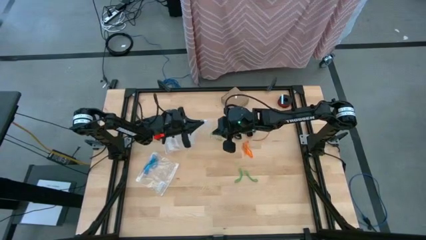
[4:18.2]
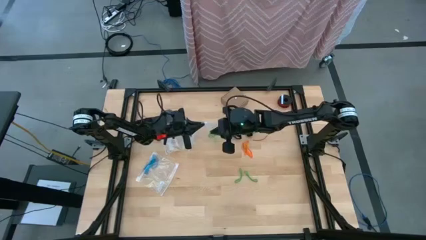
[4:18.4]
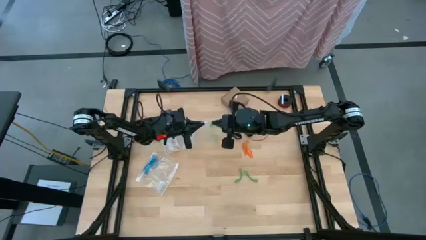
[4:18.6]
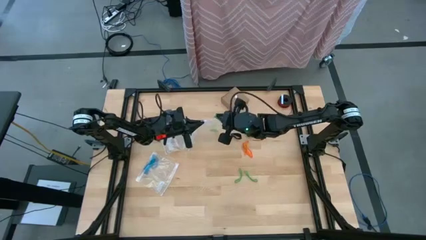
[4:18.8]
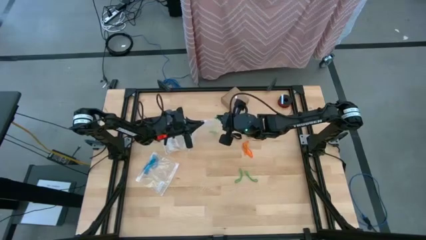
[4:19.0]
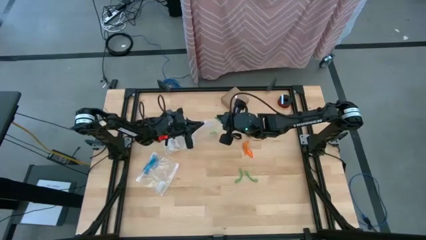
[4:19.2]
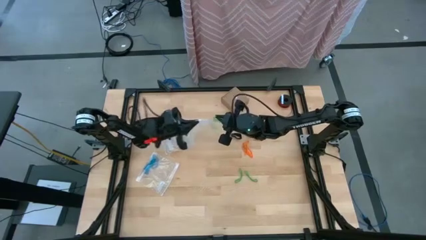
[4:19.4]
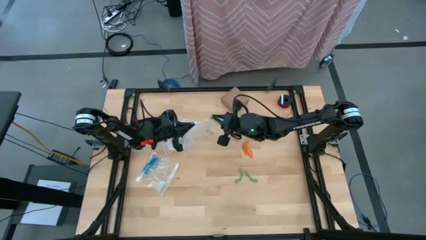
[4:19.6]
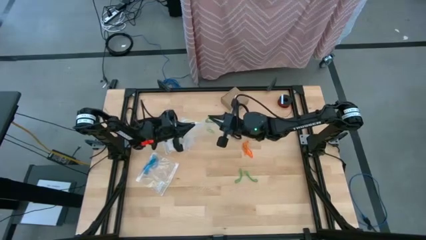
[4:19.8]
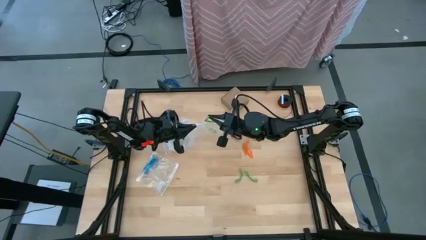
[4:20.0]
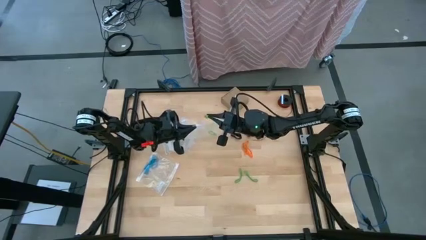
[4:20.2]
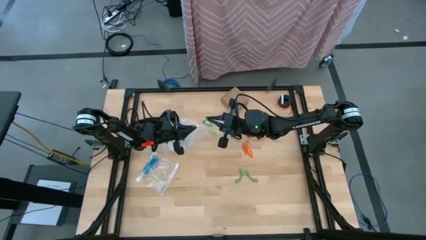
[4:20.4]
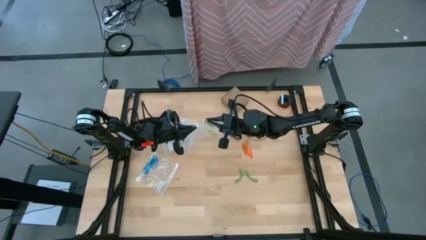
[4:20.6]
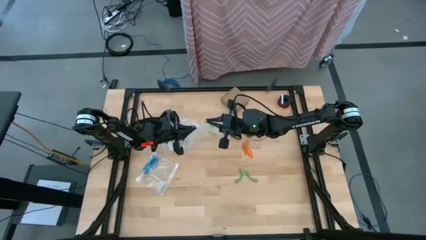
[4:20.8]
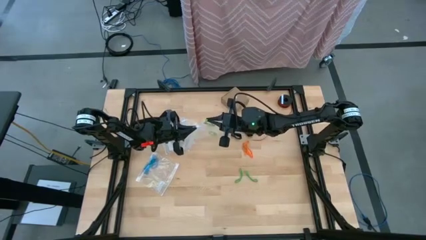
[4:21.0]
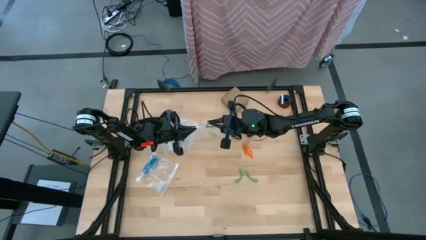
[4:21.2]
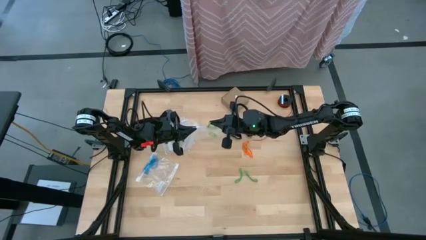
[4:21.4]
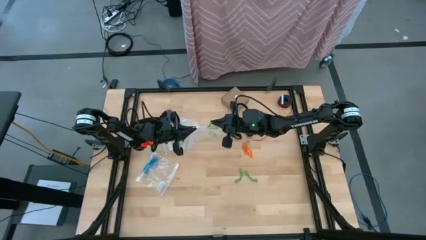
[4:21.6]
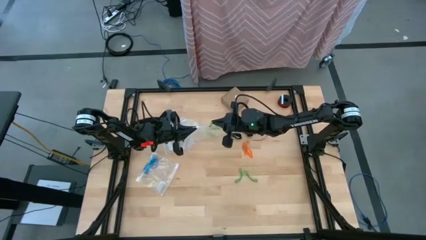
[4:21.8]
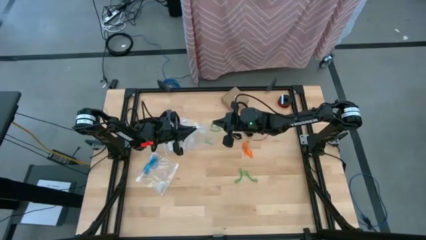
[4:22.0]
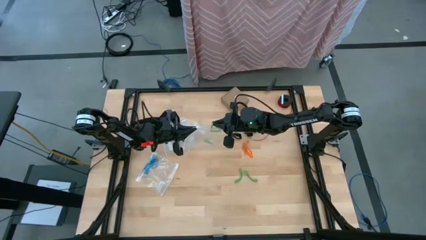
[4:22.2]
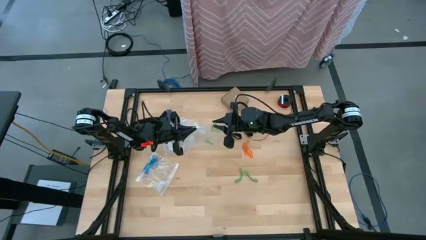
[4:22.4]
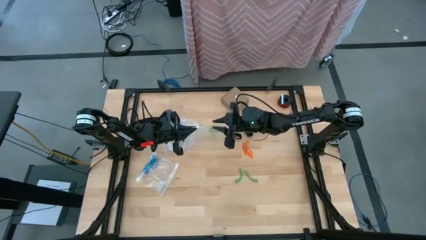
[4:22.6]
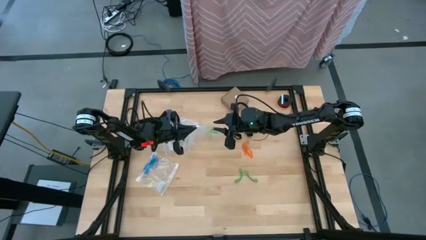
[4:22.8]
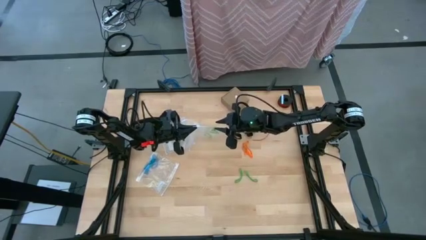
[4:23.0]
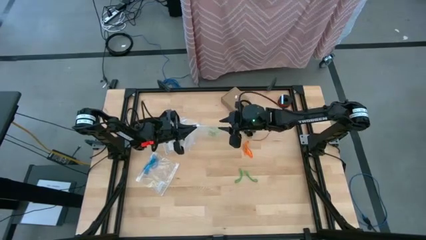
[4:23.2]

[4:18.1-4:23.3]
Task: Sort rubber bands
Put the green rubber band into the transparent zip bag

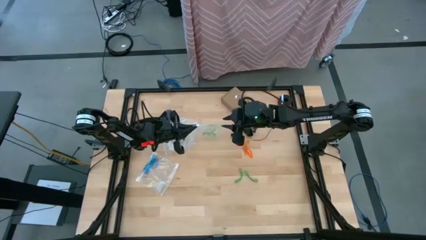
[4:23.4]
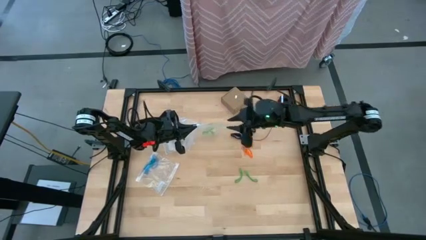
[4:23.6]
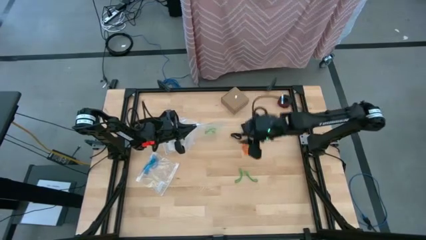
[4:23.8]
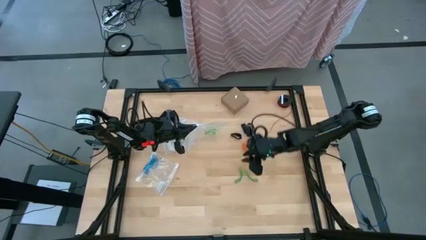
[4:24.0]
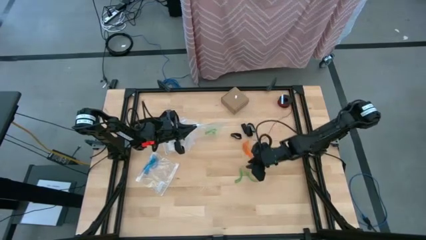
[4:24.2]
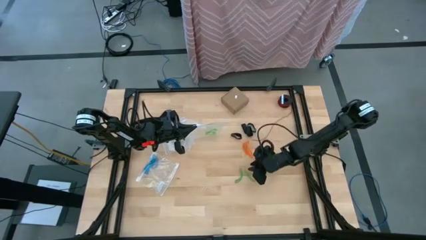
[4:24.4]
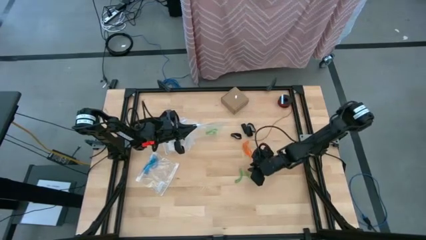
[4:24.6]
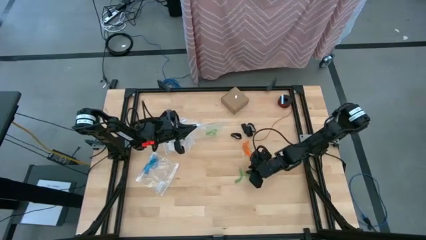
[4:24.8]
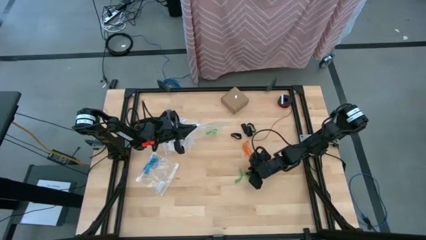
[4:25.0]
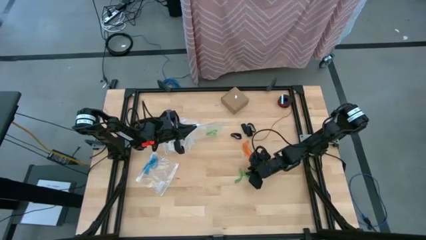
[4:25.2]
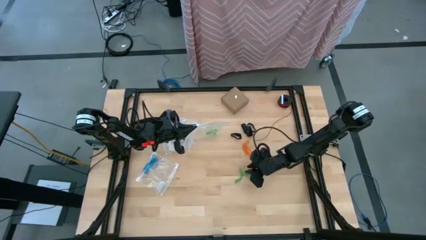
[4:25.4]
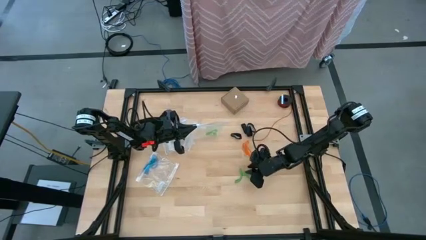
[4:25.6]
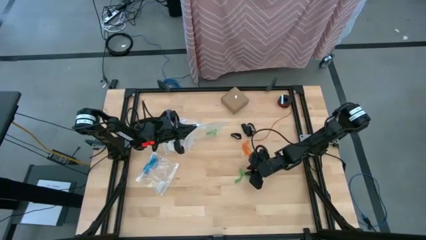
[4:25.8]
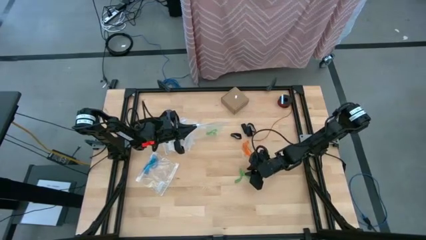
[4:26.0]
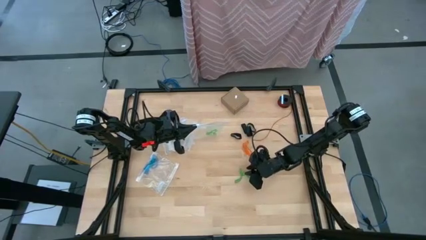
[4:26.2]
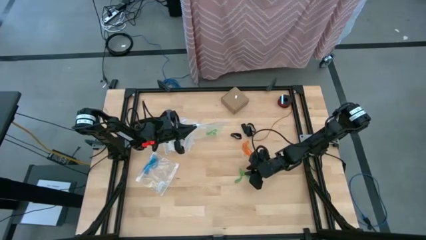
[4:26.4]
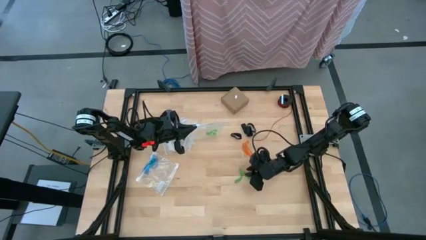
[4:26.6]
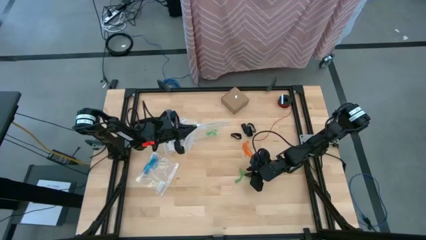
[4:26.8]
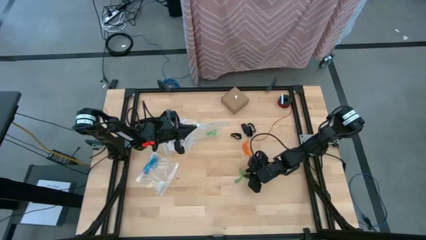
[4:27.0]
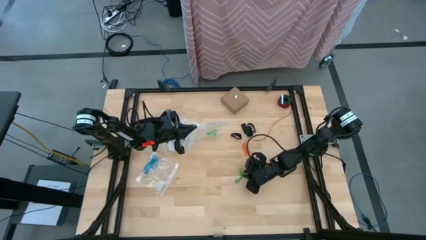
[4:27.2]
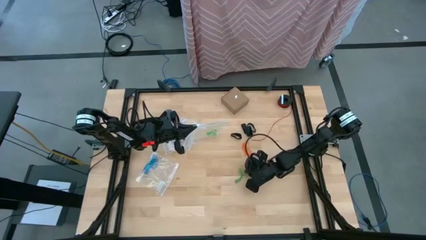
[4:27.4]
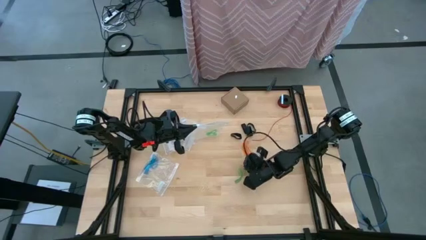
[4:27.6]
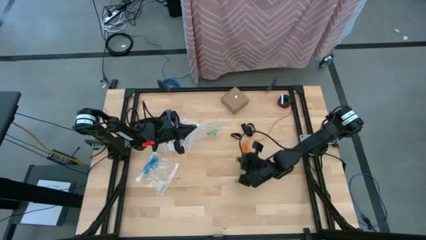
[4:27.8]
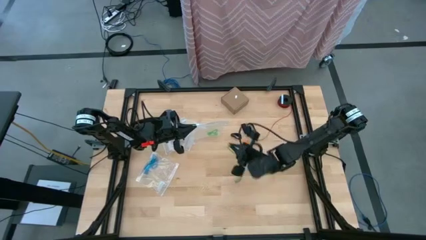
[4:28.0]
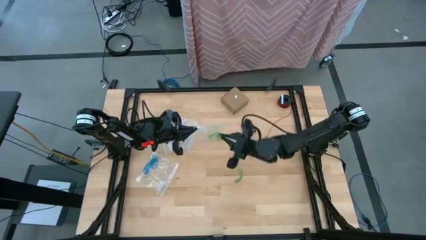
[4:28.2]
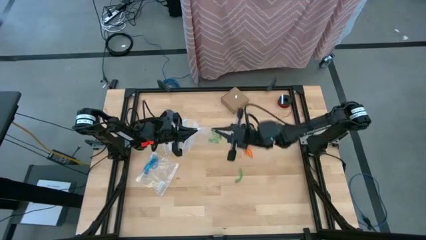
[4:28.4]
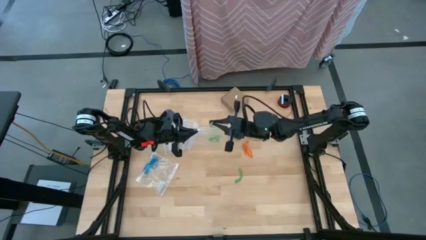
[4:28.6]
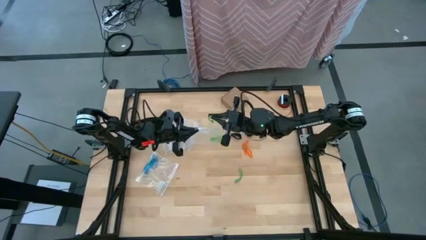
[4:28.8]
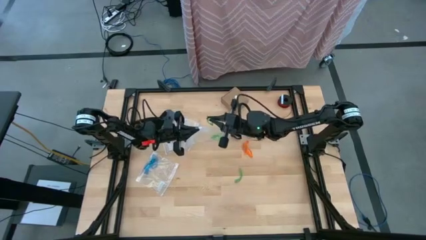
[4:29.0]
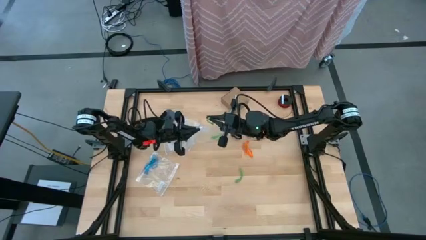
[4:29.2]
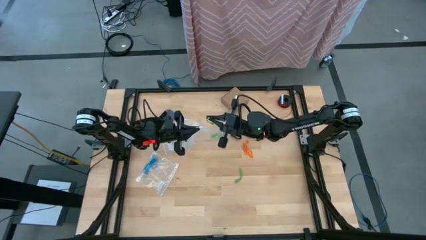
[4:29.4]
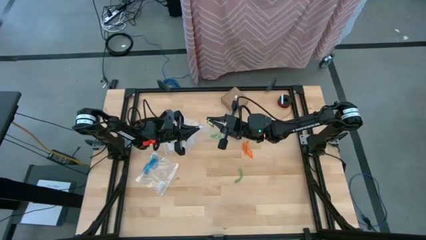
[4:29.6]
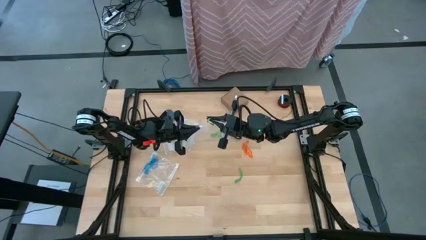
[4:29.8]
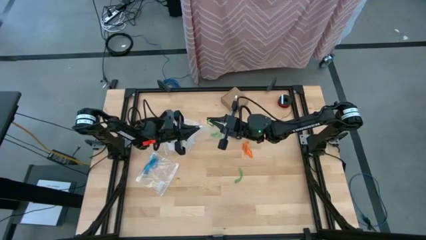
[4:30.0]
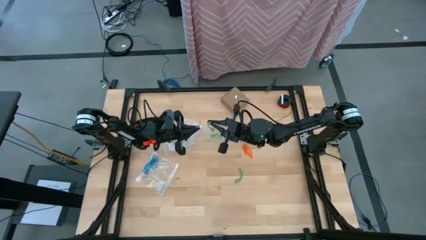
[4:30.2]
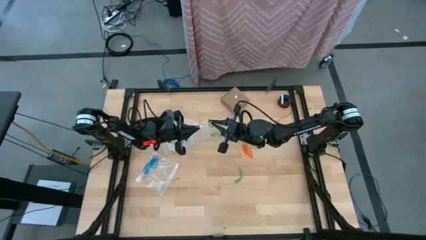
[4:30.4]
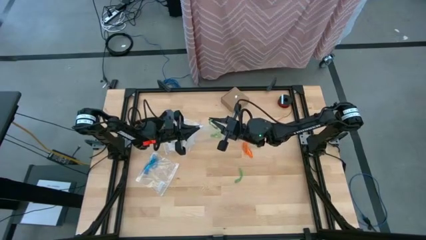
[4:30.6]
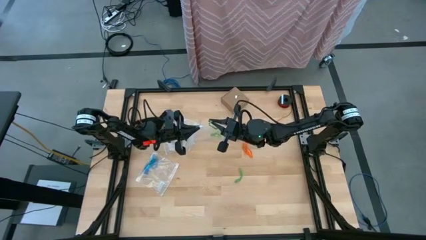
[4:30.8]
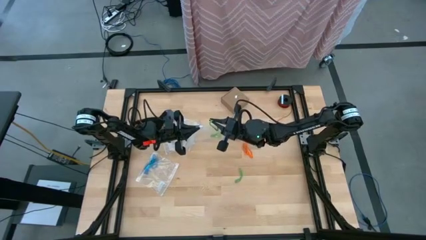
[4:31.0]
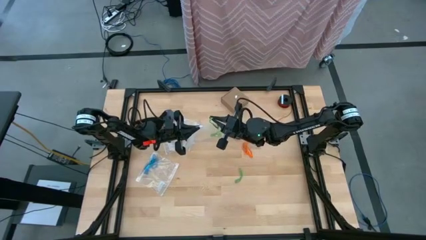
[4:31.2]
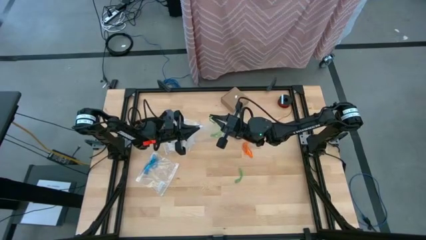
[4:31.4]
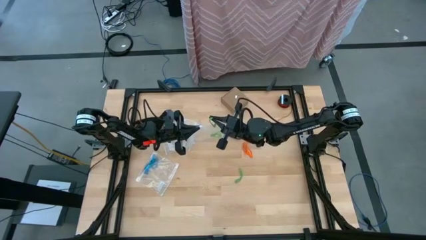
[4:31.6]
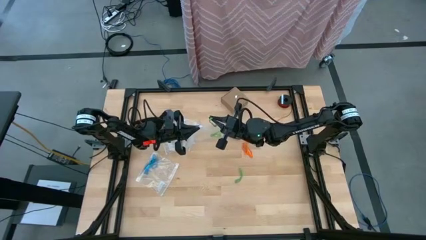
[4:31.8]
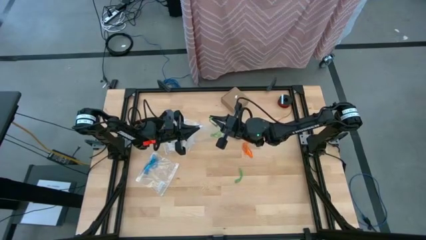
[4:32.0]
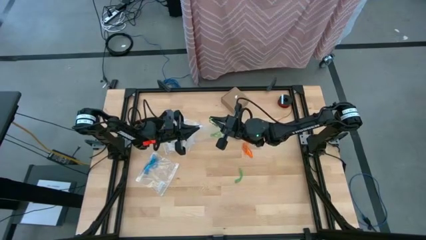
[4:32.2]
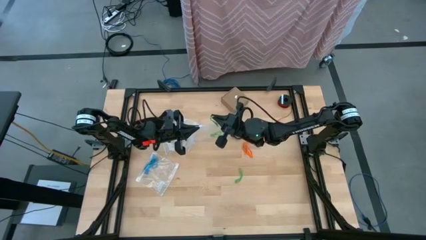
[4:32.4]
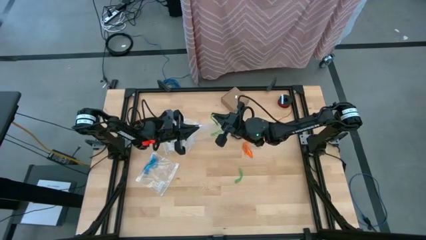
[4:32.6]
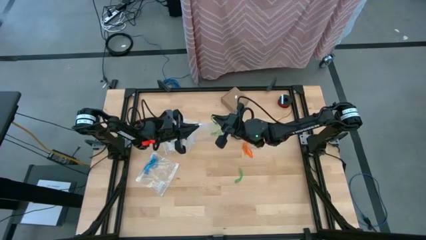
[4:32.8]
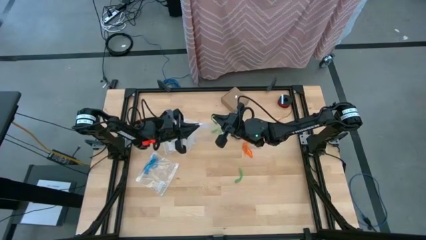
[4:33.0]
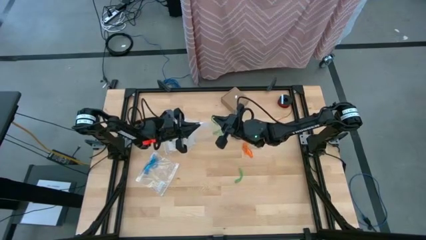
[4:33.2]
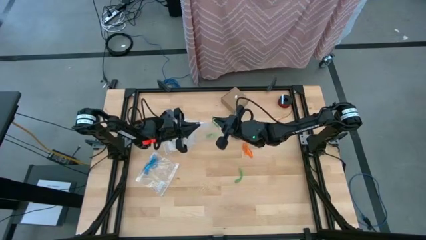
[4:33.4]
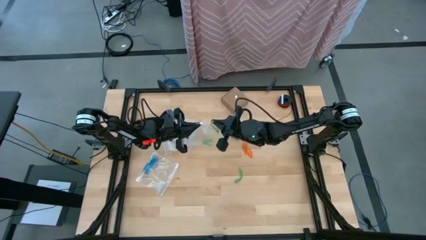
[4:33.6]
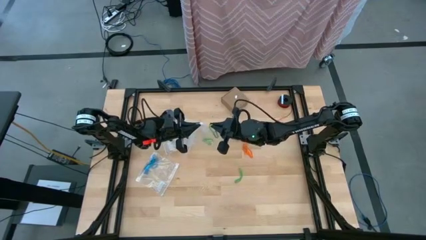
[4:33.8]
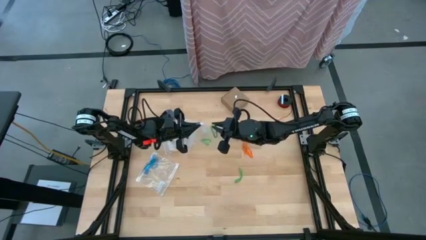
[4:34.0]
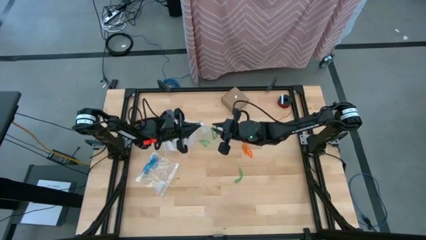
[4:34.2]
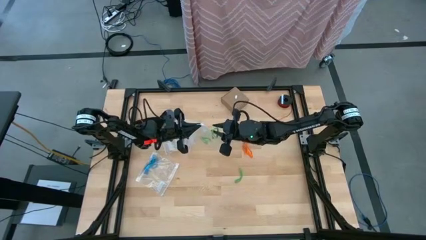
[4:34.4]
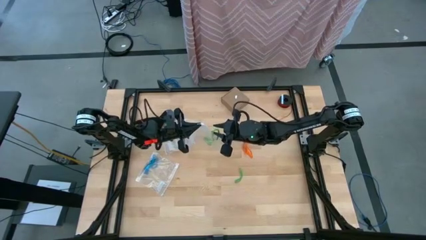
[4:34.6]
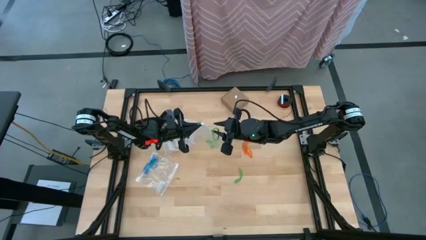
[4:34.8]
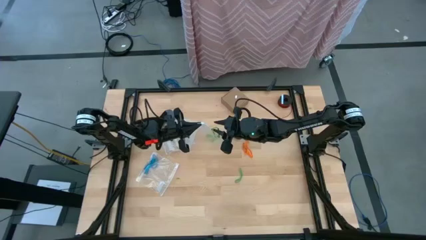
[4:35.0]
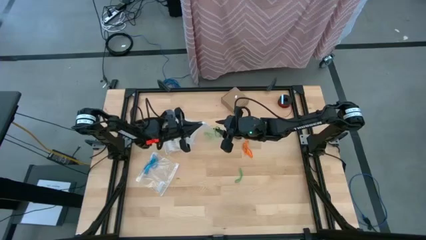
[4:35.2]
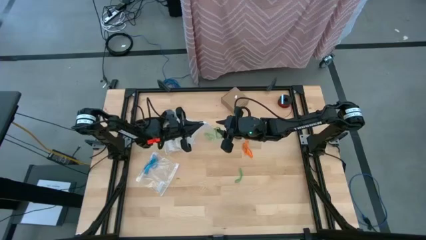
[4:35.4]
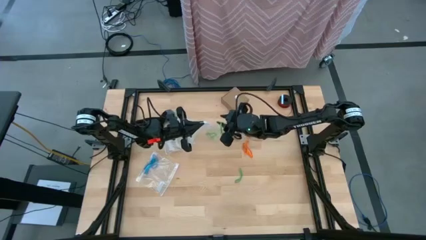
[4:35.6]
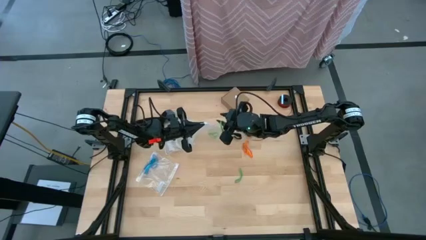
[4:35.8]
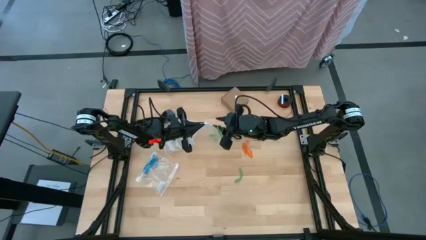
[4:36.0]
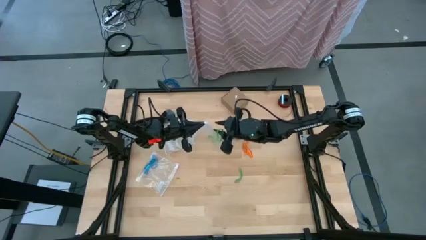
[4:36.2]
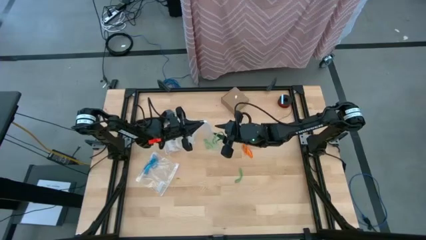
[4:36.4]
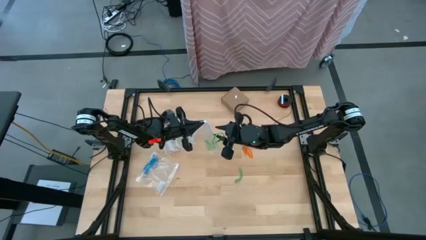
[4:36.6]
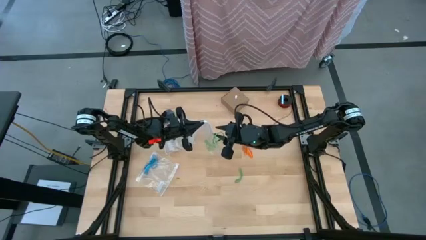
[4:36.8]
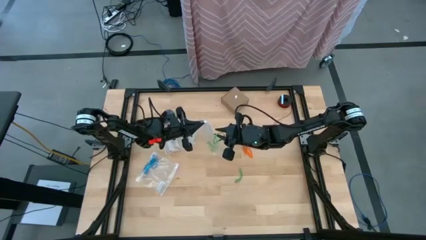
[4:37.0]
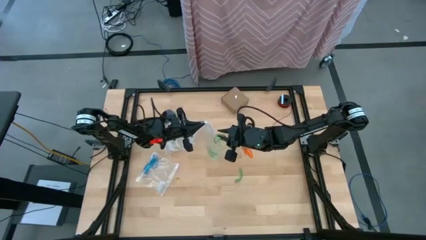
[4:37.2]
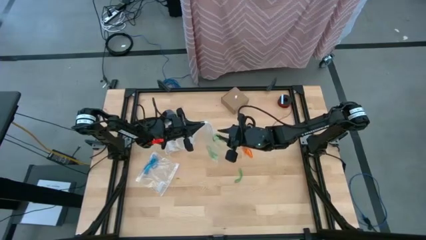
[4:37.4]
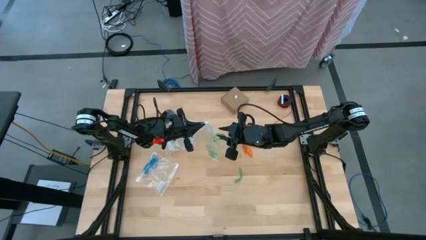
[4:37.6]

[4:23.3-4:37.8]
Put the green rubber band into the transparent zip bag
